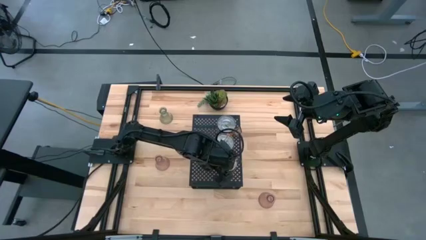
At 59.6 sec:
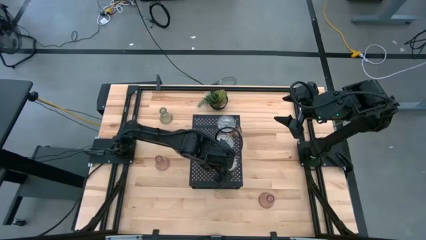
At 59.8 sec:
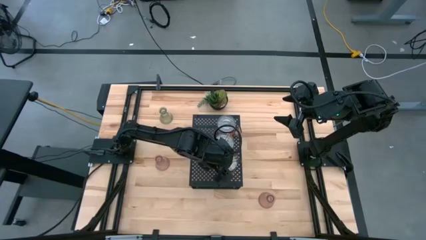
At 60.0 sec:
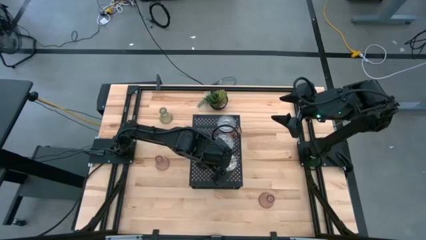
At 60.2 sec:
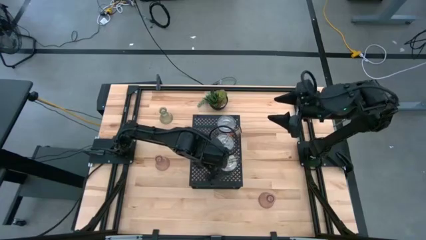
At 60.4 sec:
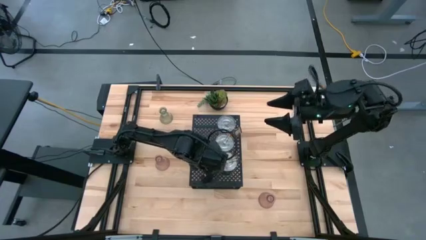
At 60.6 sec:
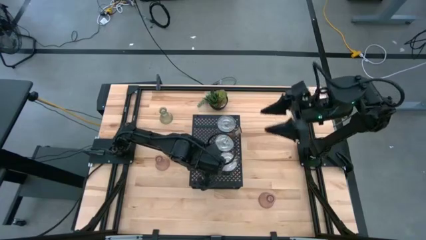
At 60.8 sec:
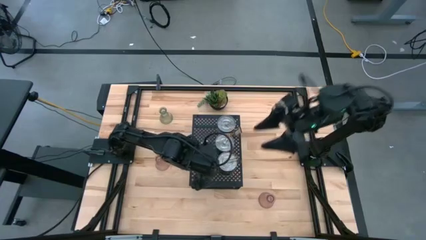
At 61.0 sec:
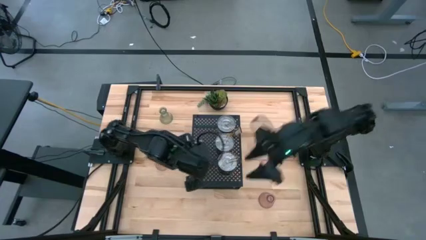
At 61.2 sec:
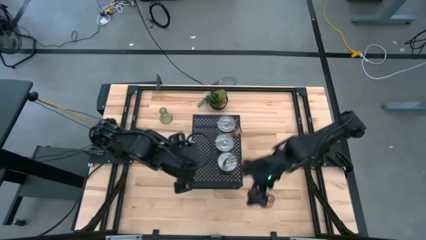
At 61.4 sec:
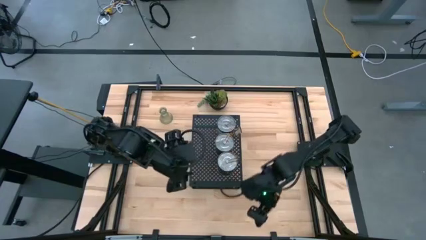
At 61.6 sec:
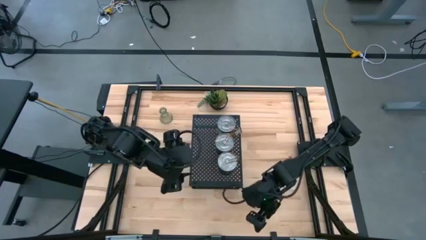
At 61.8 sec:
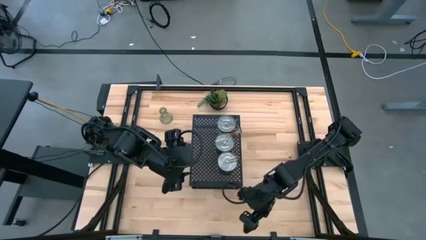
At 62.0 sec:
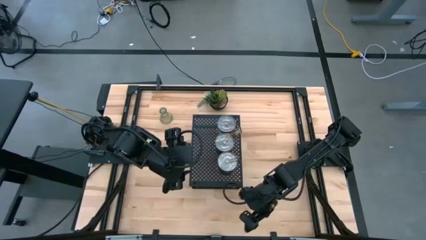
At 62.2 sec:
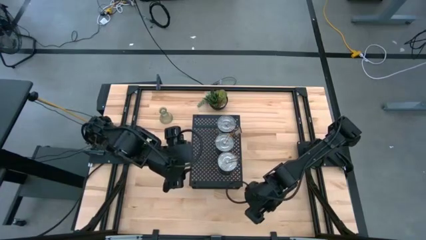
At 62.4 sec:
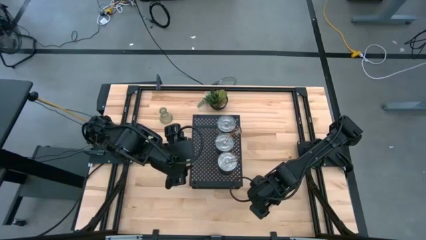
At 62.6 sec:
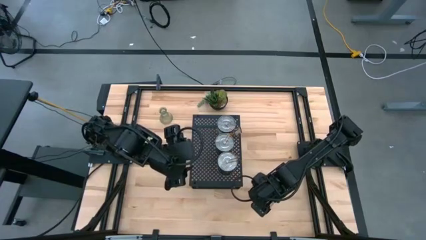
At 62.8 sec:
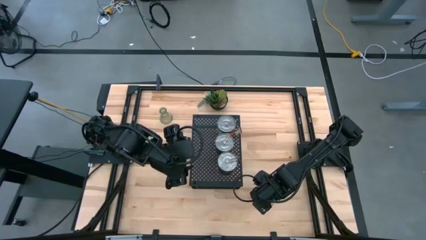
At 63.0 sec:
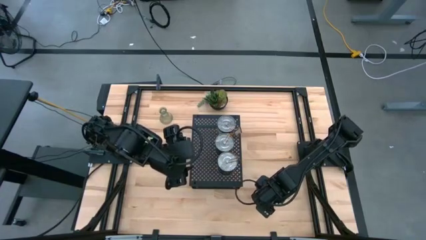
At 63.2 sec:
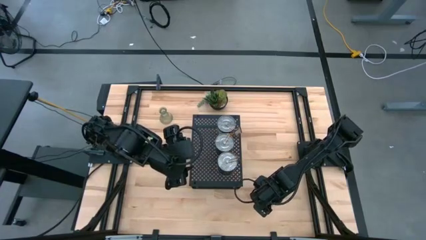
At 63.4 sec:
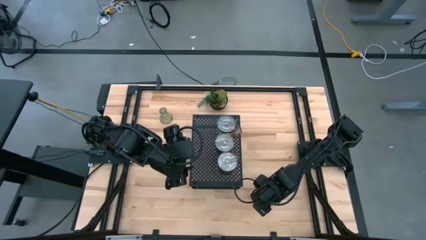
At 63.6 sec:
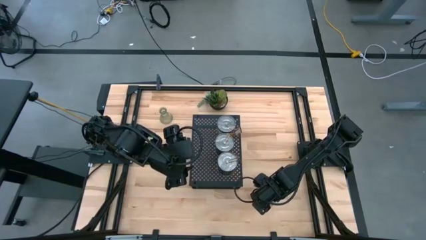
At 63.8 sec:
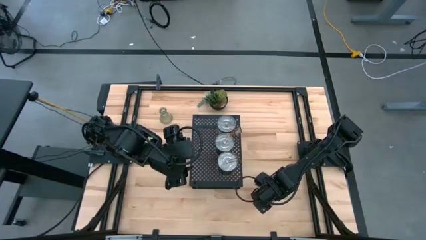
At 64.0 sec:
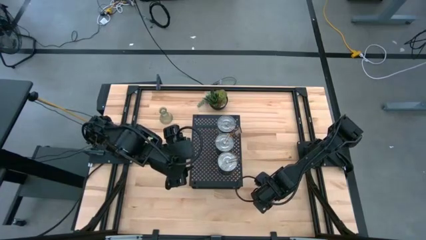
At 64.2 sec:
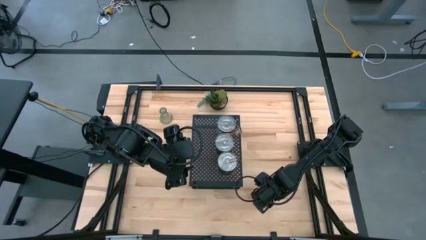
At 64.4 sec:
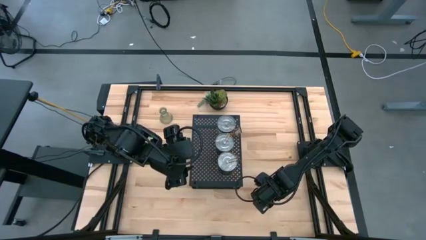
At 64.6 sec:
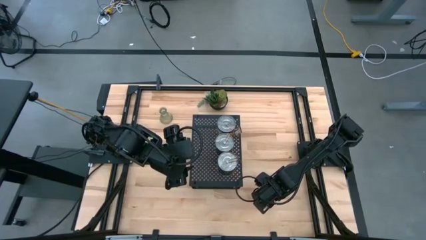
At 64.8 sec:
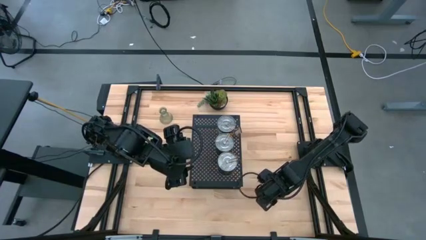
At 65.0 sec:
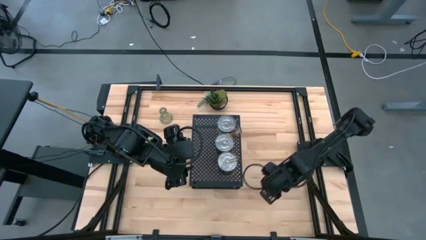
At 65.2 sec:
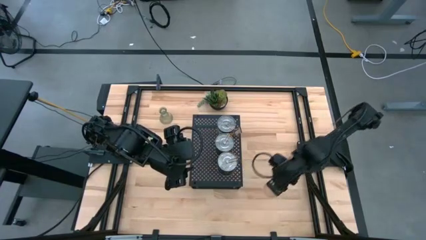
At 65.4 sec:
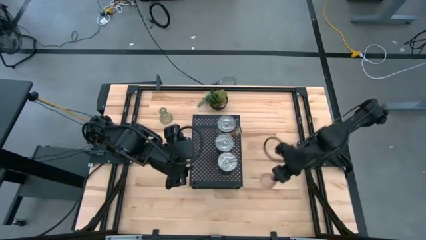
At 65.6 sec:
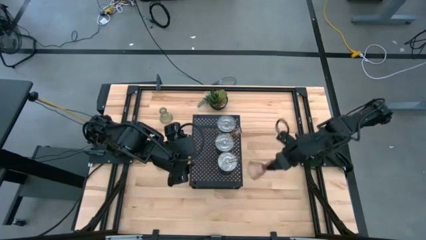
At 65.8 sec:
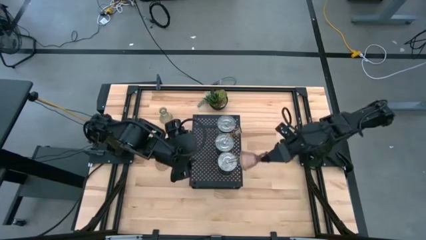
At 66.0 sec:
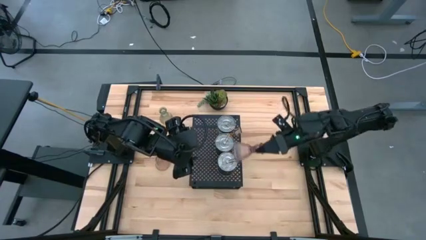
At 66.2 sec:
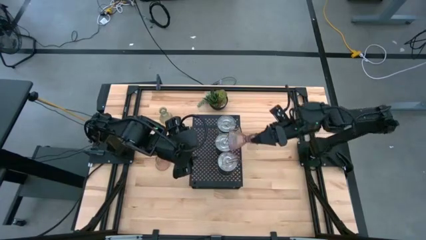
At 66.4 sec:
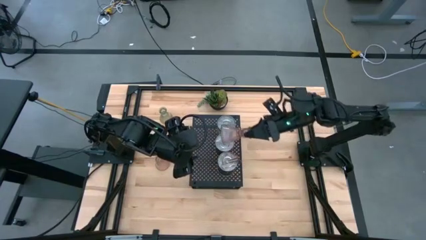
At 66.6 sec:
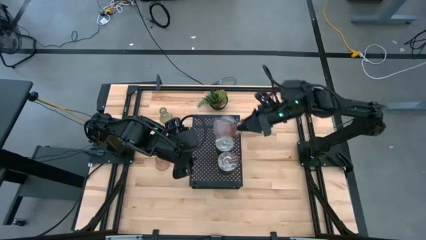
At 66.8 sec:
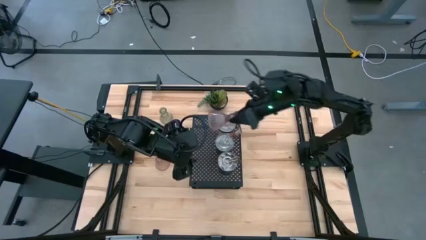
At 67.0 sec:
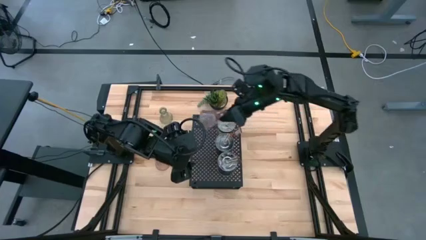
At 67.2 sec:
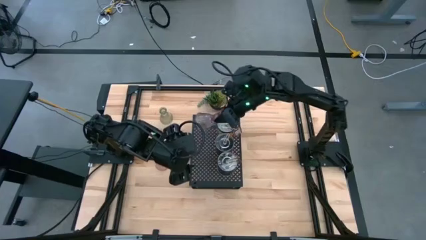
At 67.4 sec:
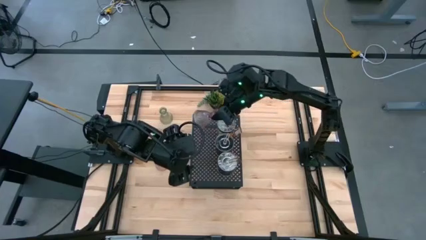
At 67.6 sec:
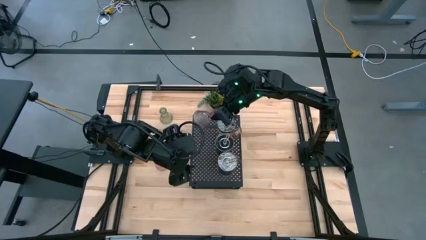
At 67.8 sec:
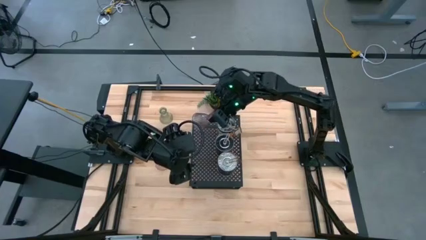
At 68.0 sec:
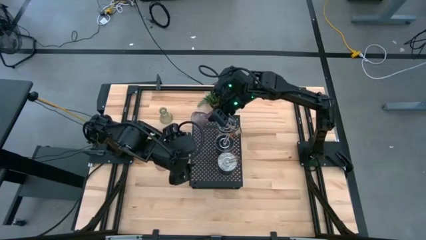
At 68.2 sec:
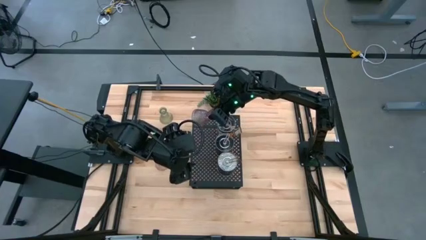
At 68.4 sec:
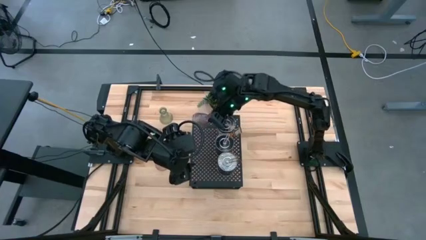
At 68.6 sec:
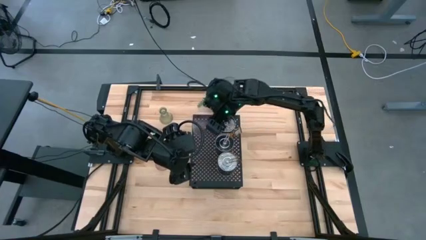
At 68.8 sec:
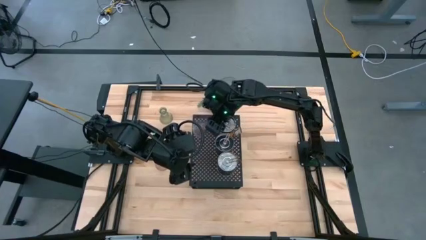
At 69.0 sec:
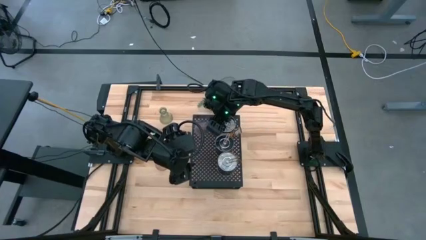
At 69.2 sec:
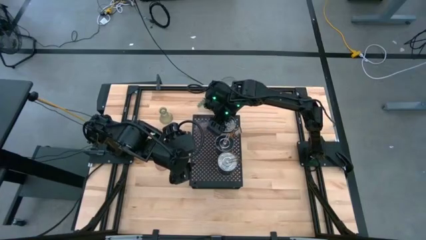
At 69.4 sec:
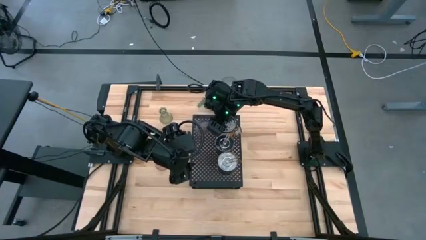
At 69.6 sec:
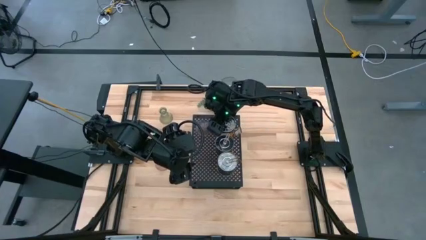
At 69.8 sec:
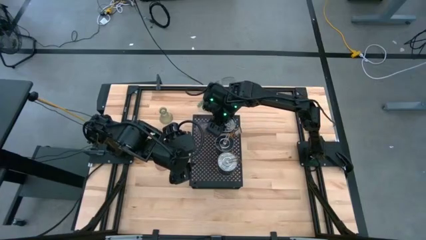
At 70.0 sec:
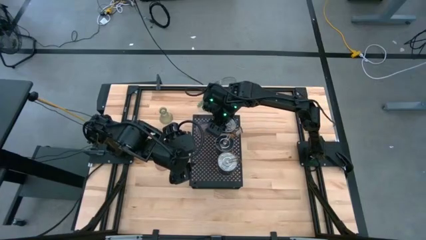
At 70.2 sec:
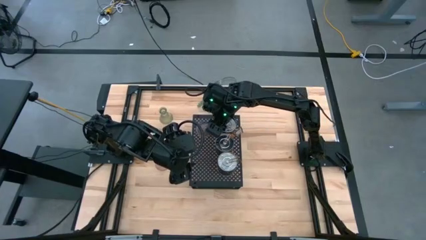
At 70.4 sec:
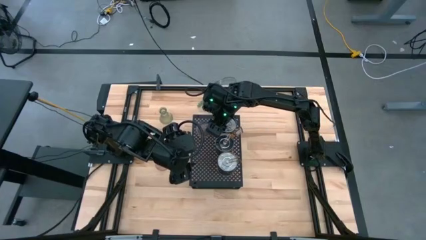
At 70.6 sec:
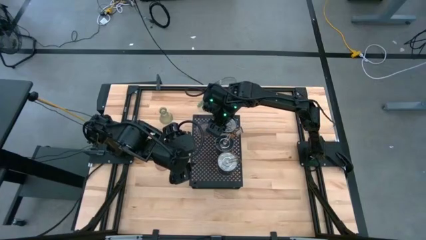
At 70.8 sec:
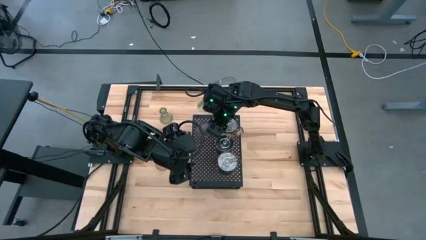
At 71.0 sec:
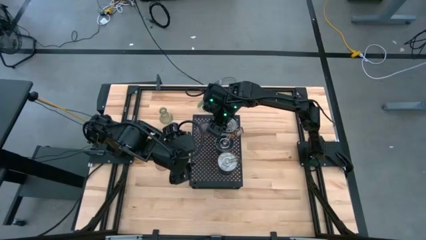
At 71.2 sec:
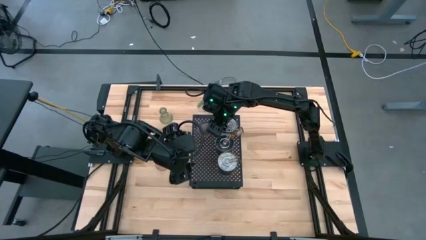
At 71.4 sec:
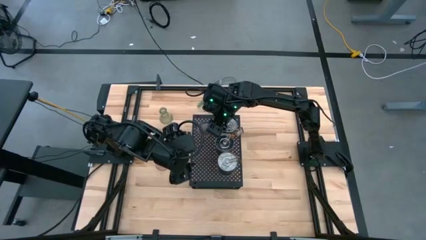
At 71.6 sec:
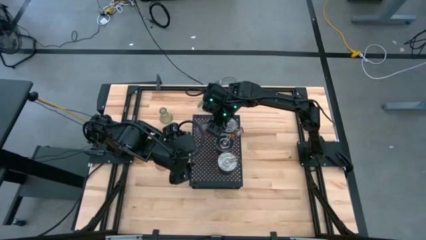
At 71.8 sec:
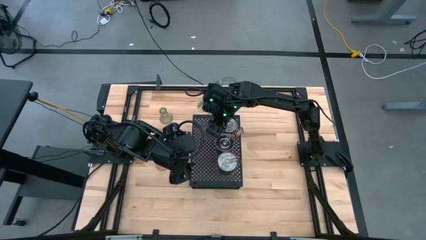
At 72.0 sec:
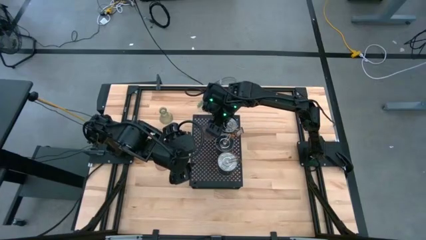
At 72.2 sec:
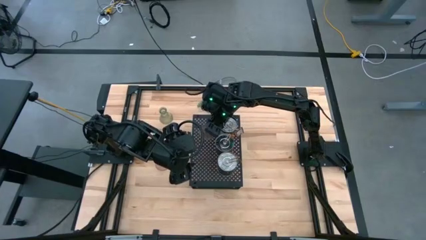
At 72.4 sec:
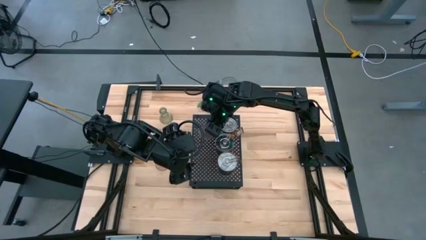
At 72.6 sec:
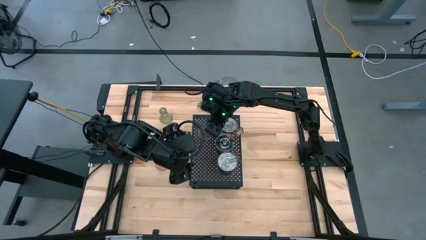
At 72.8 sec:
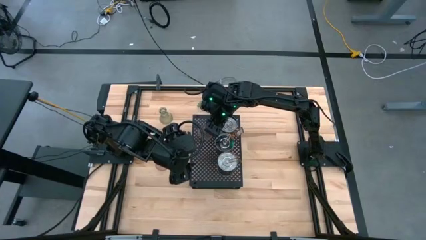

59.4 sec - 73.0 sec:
Task: Pick & Place candle stick holders
Put the right pink glass candle holder on the shelf

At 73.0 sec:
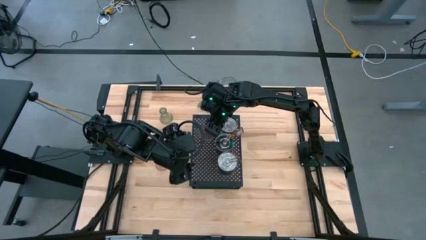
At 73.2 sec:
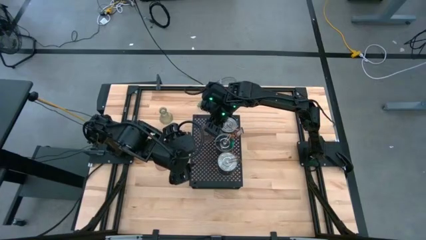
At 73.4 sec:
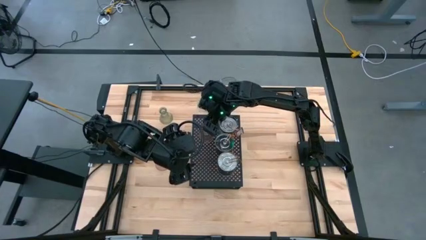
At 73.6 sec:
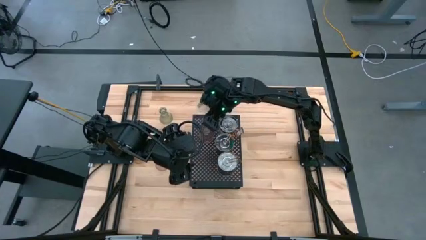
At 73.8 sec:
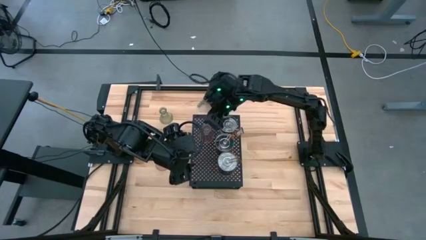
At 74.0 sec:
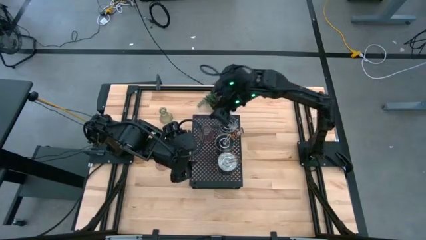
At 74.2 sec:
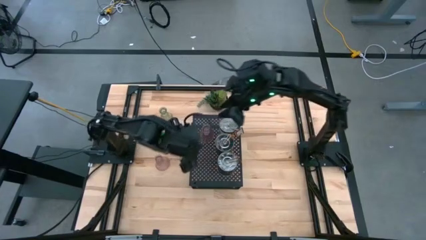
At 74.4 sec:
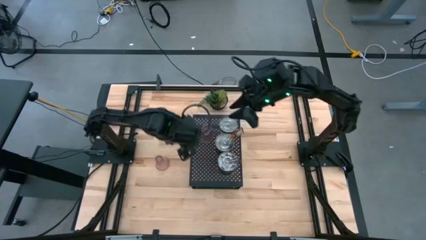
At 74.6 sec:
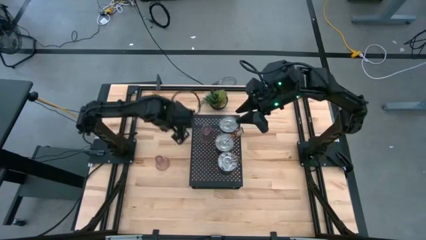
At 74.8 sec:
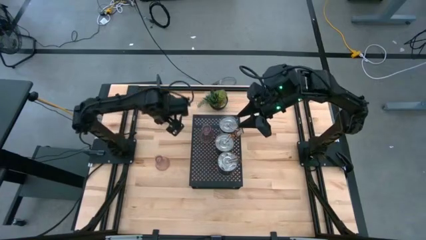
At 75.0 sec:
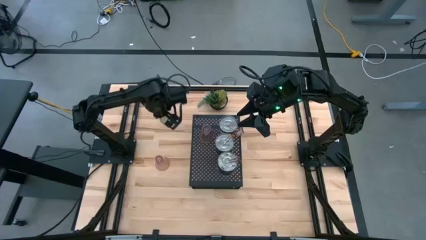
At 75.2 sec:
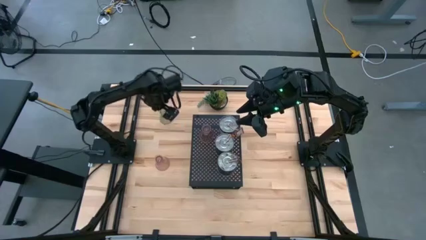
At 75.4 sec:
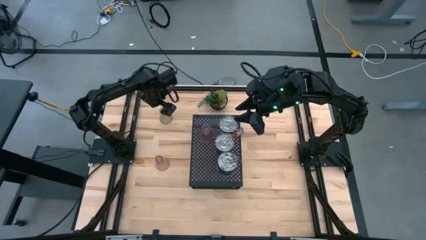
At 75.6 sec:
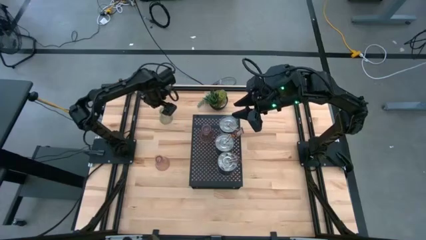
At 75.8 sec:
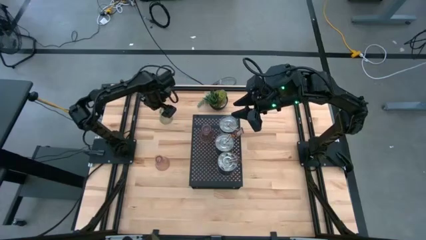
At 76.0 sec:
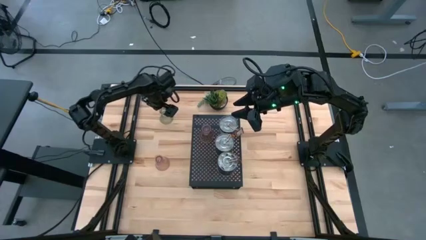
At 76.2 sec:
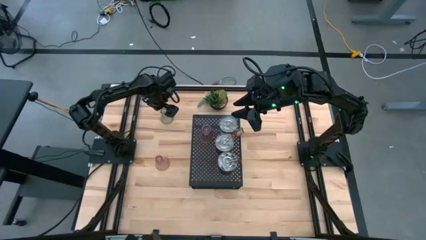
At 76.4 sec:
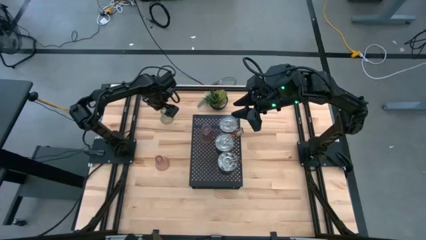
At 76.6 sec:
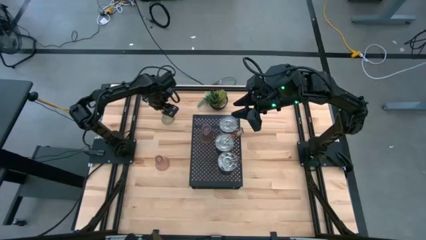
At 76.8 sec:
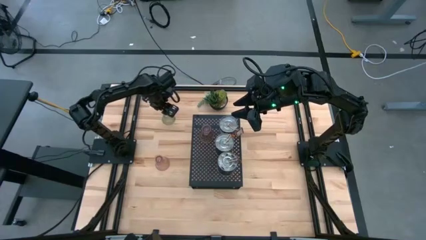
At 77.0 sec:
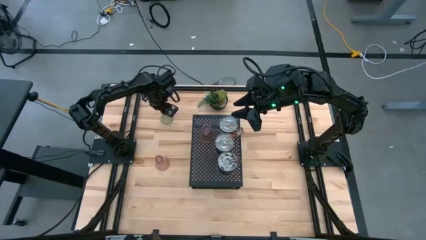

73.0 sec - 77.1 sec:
Put the green glass candle holder on the shelf aligned with the other glass candle holder
